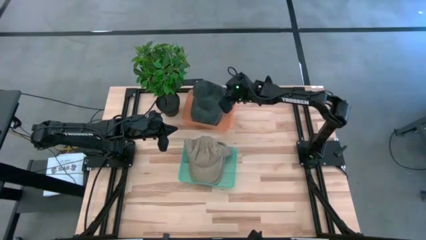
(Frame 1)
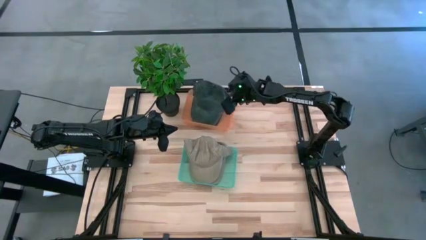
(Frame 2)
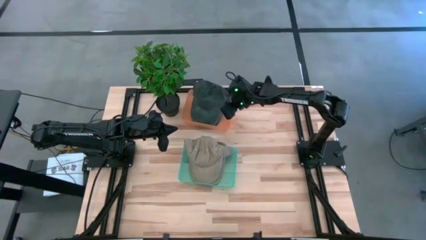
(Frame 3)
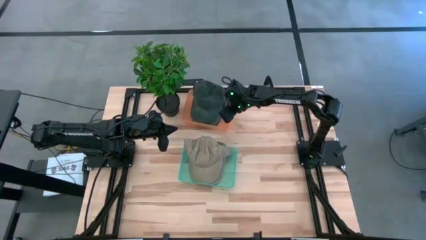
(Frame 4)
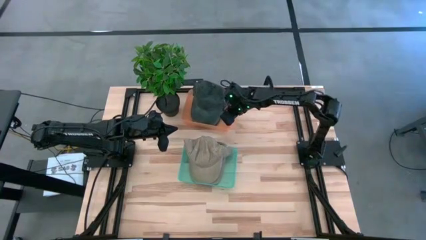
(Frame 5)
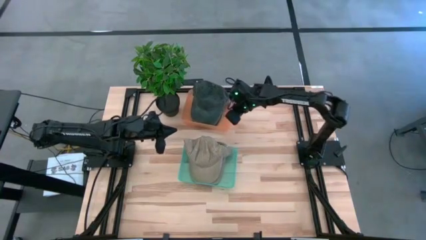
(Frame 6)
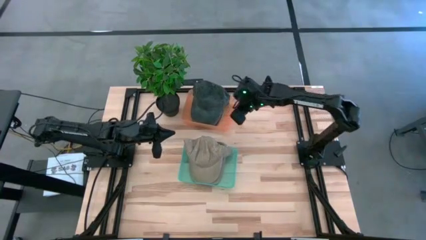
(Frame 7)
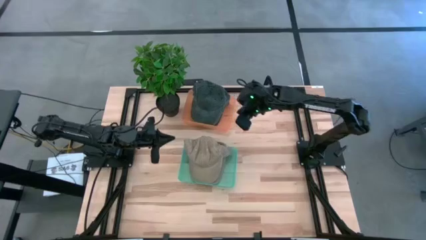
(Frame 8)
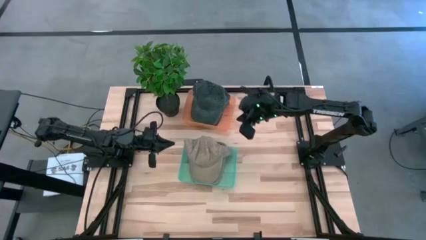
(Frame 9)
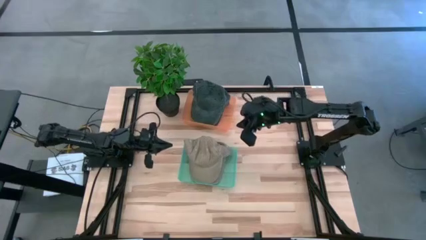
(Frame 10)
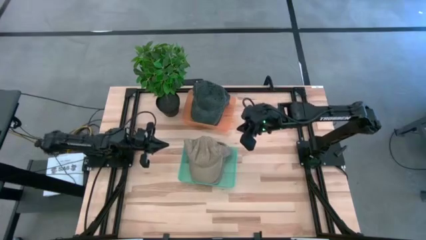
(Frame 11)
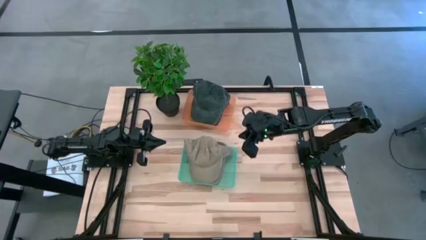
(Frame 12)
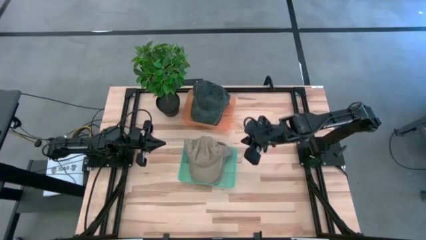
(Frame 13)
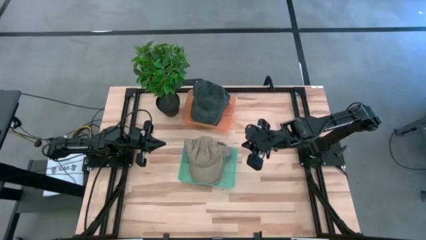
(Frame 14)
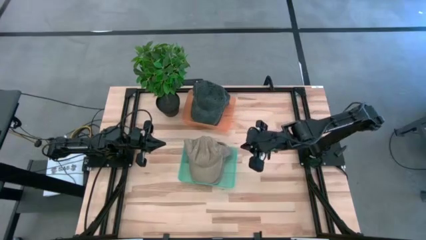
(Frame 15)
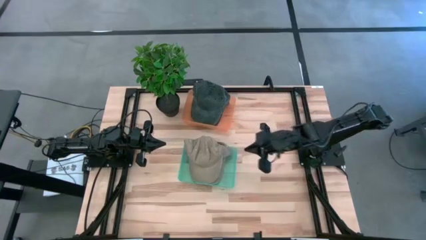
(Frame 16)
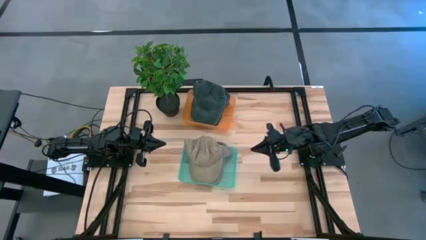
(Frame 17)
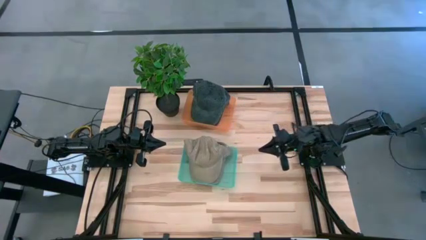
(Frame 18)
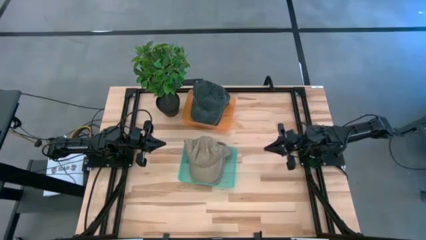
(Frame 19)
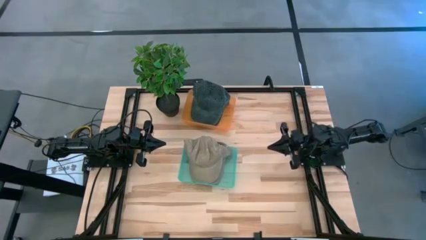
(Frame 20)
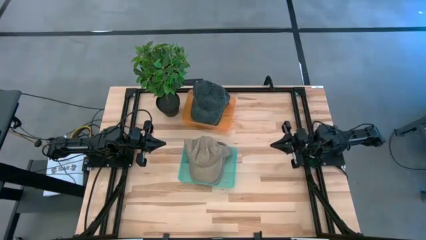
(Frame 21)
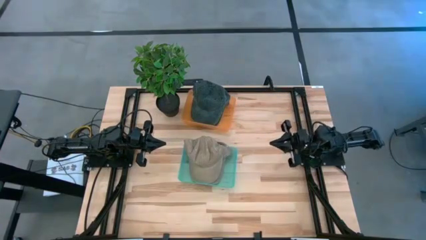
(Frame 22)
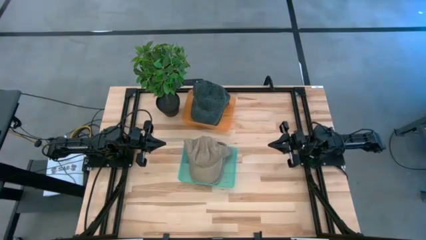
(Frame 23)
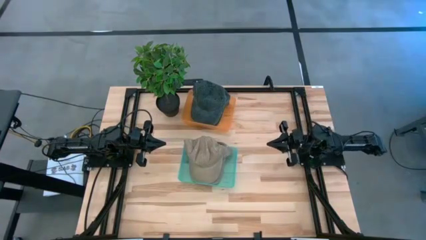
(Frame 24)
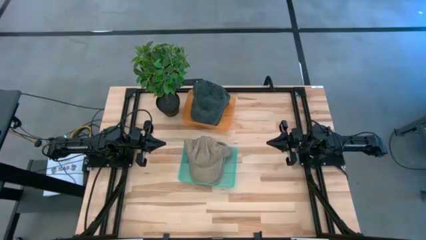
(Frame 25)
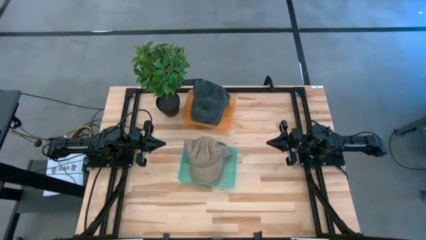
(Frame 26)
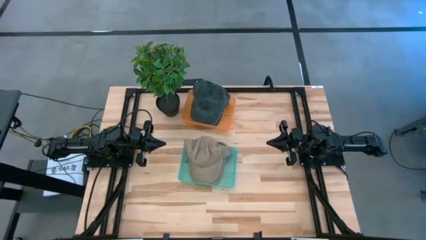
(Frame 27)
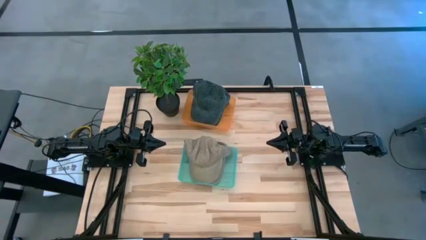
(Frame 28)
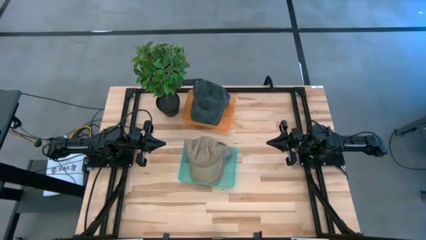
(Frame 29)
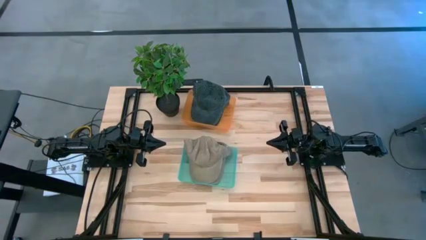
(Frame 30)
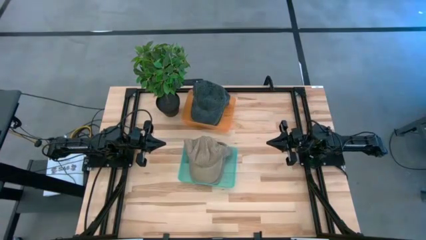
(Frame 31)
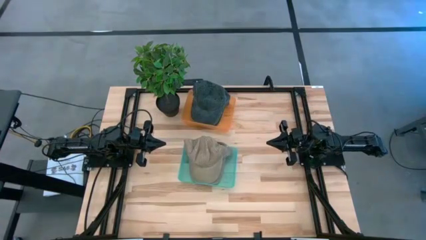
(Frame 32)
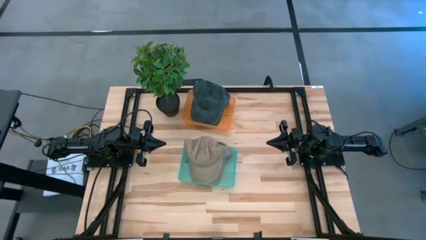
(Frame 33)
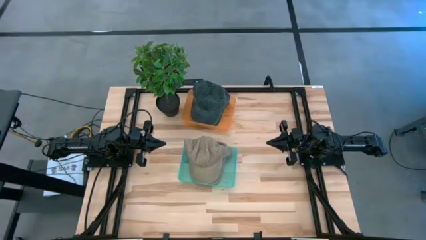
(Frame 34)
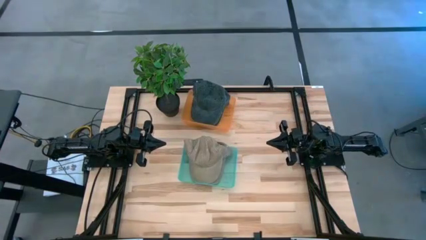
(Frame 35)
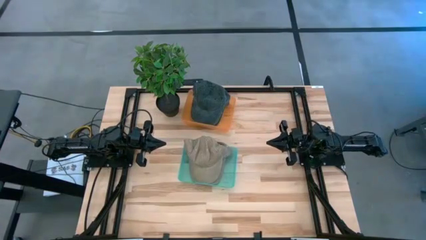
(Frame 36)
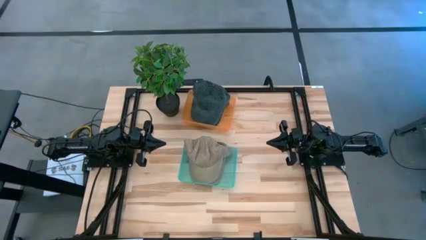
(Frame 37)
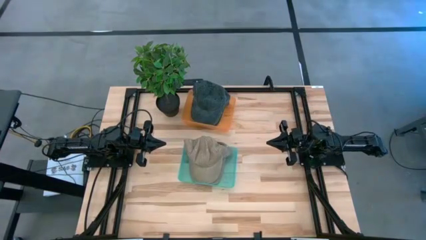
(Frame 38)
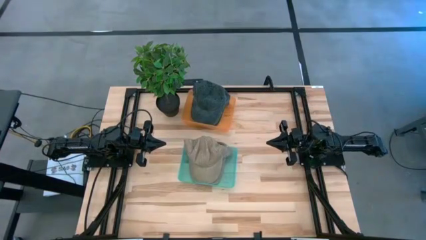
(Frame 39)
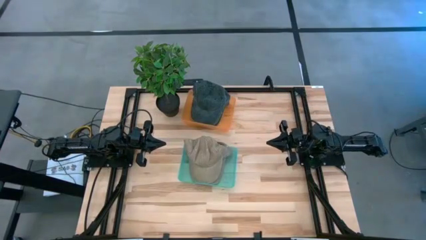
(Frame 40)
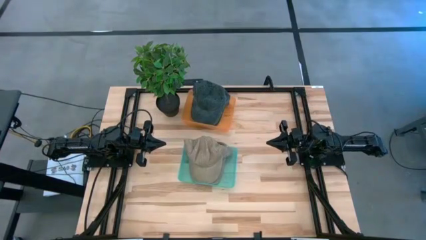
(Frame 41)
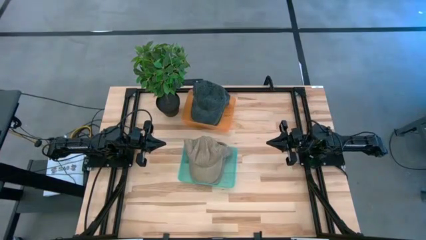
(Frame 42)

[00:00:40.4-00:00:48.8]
Task: Pick & Place hat
Return to Home Position

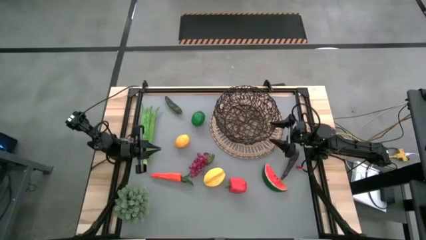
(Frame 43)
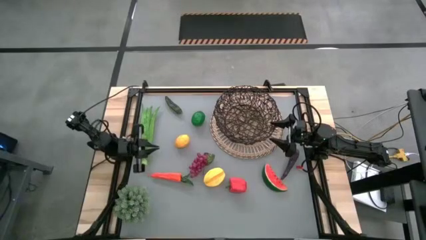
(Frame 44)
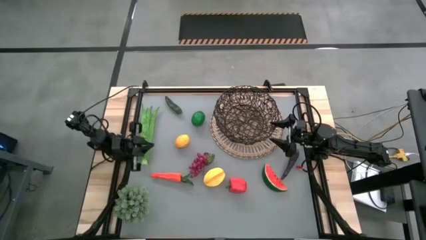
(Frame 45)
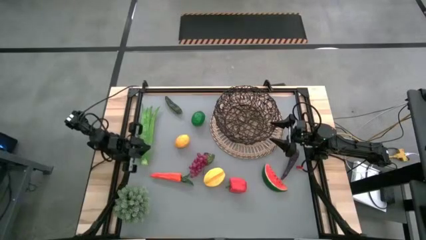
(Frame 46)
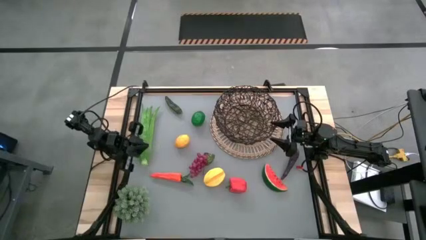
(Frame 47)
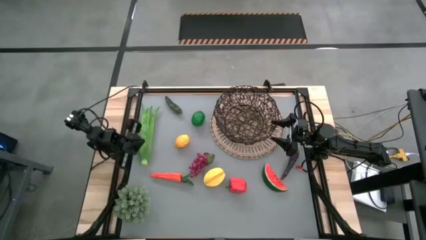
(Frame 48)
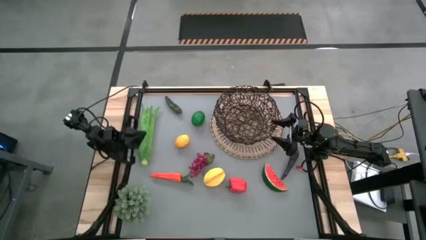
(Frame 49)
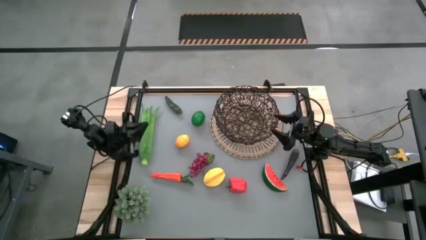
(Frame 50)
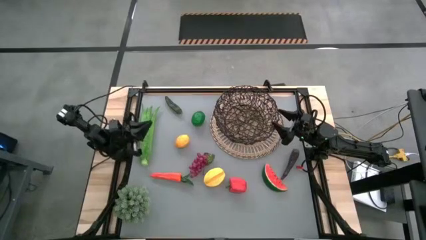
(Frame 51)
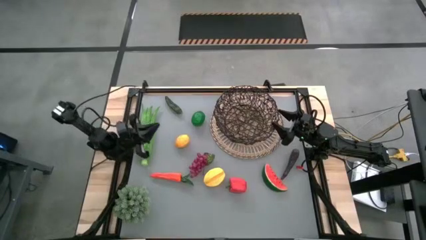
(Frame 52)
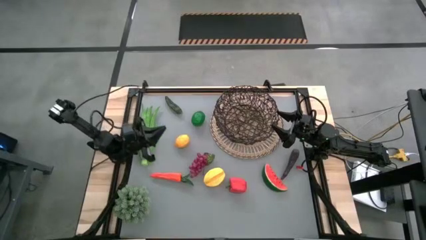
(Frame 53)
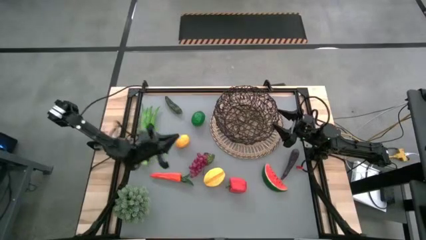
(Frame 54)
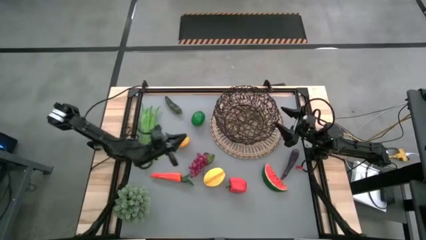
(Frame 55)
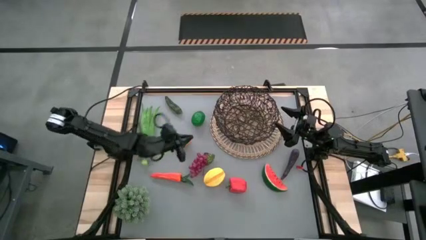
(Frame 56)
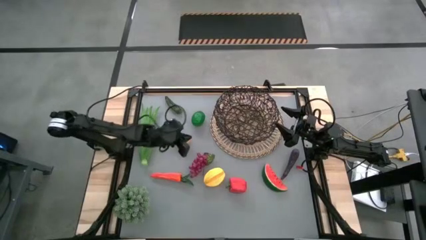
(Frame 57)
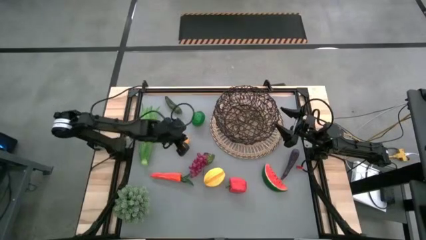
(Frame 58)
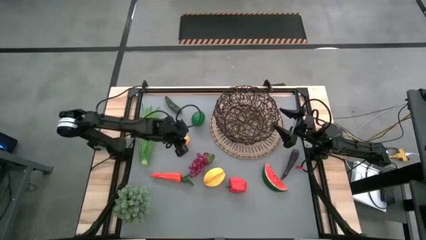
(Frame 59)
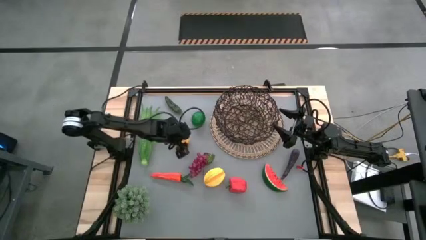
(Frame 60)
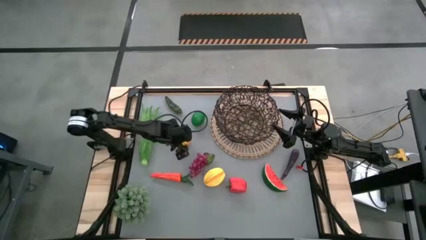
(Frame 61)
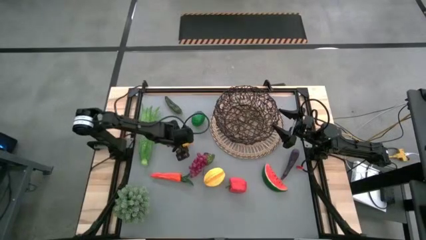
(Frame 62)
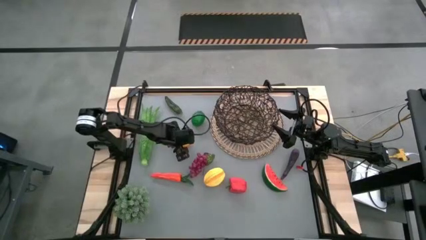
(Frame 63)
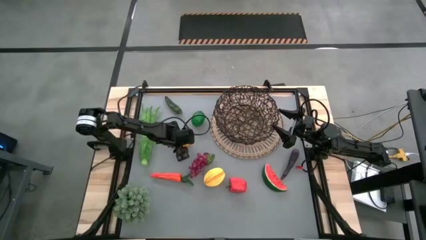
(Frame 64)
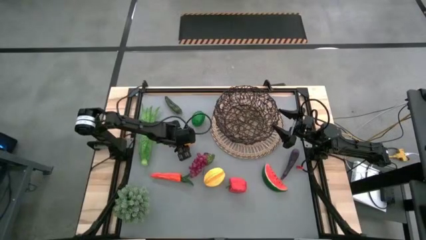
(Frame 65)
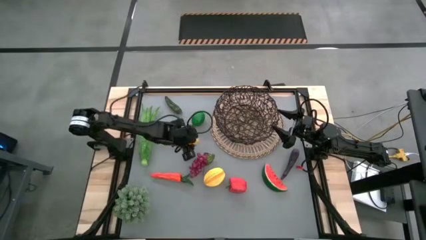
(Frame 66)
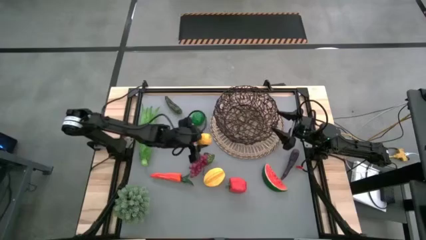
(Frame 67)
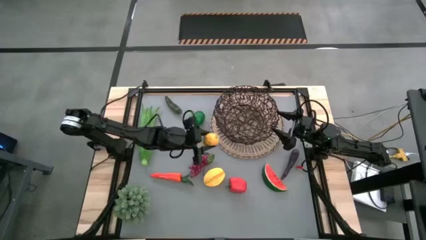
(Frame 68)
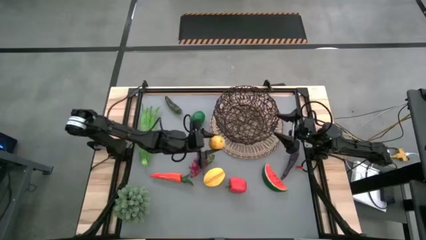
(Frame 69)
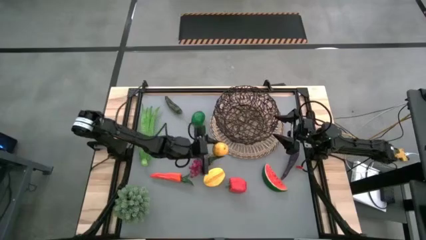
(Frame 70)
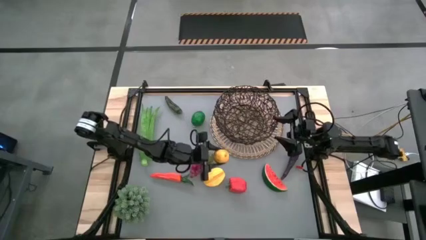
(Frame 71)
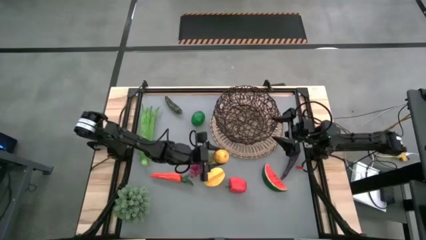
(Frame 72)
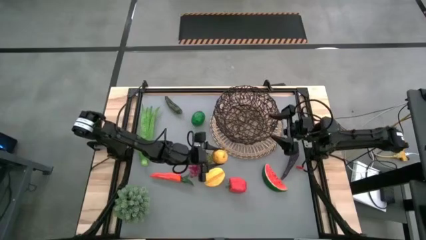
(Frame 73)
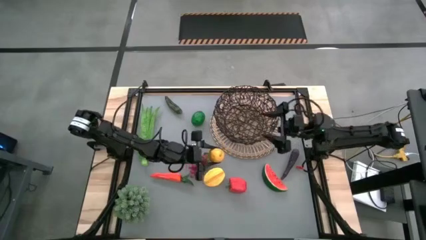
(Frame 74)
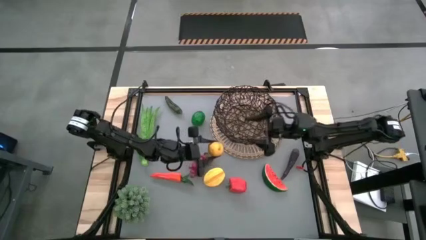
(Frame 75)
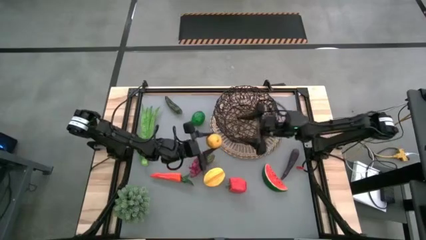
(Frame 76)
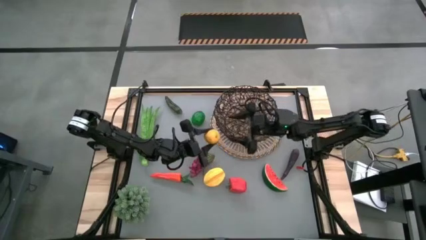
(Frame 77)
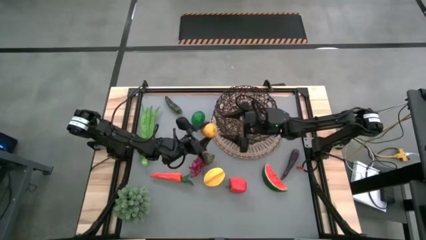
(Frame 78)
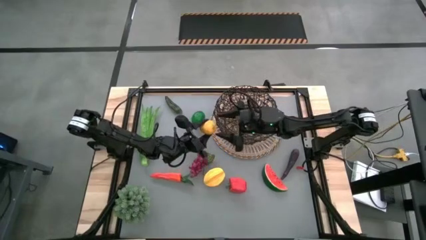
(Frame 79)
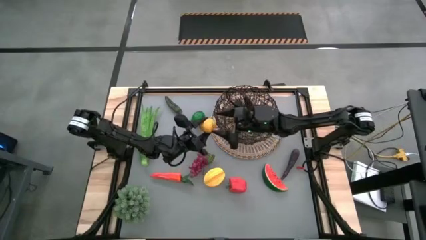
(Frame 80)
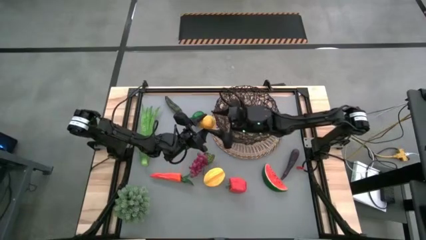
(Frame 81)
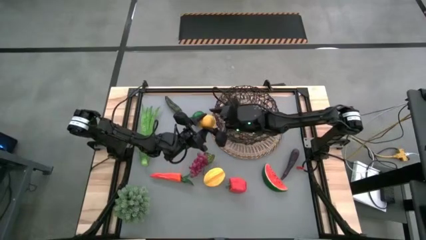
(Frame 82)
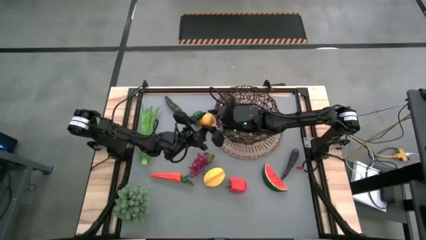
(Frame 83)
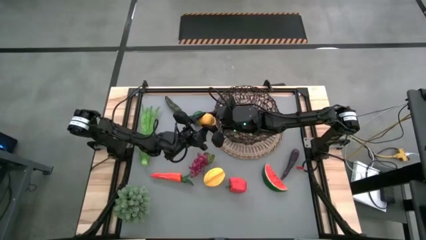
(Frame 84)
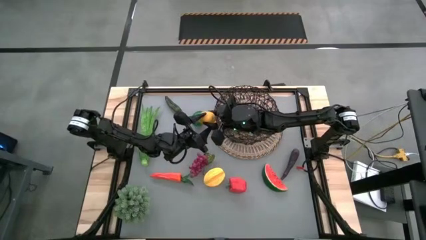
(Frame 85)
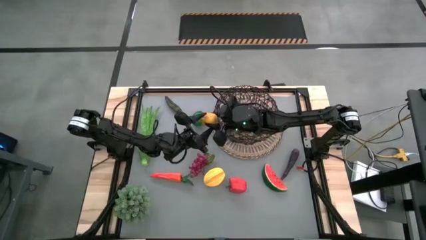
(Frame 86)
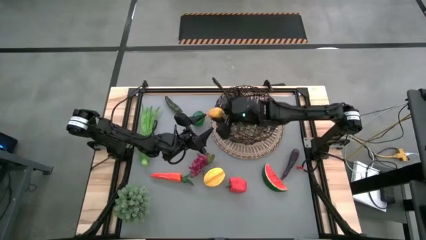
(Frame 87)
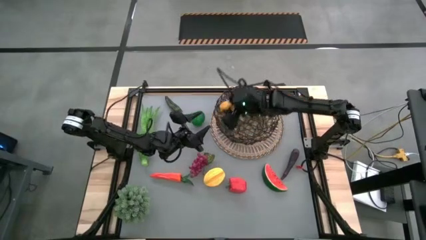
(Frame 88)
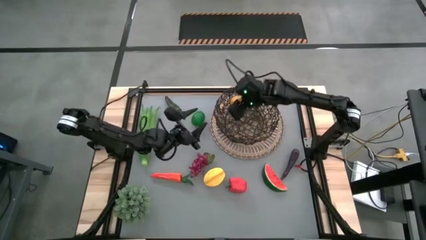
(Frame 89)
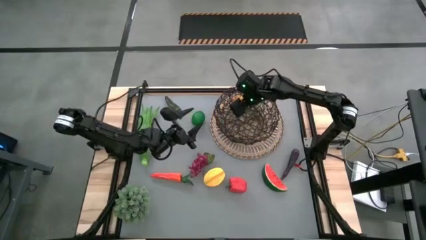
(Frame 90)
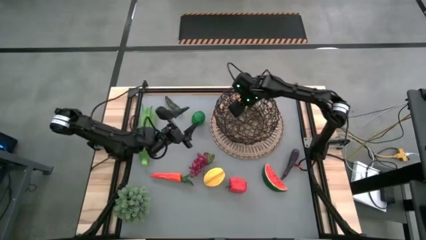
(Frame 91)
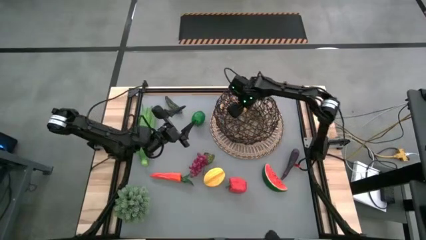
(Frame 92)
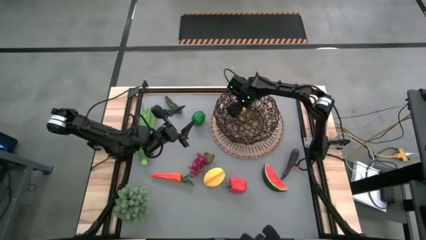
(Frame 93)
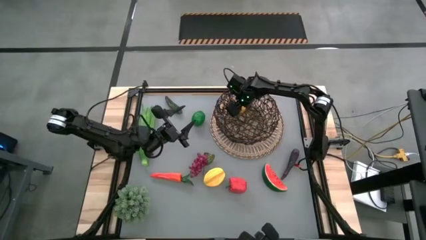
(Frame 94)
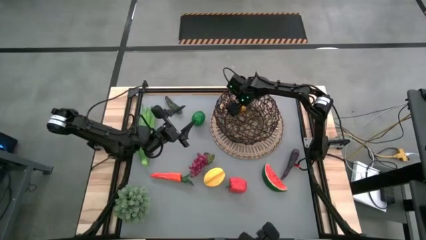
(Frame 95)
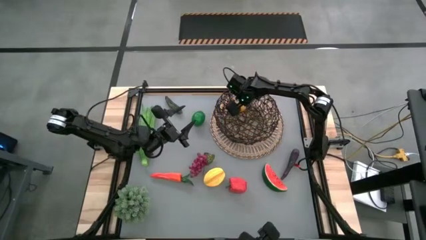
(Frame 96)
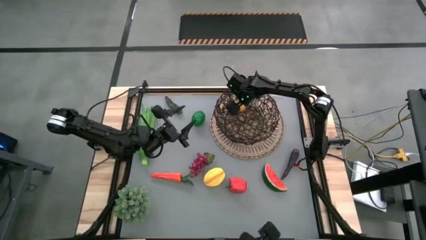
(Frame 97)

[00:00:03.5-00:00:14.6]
Task: Build produce basket
Put the yellow lemon into the basket
